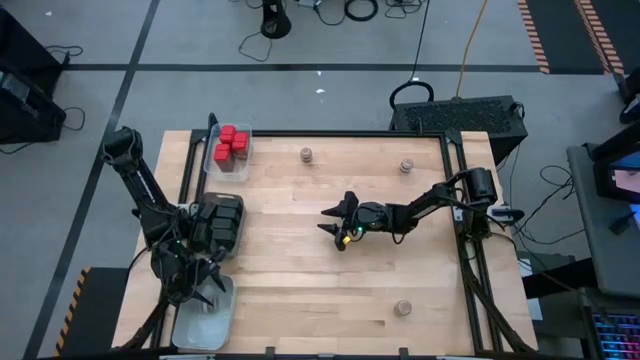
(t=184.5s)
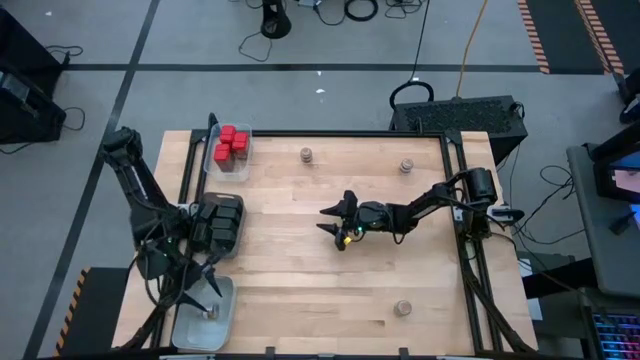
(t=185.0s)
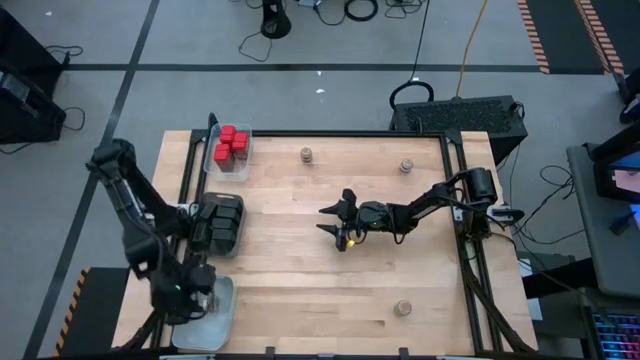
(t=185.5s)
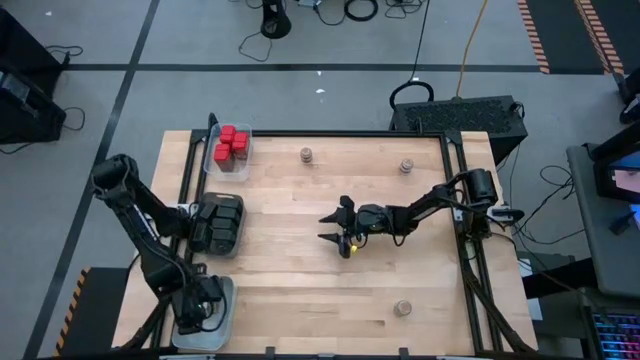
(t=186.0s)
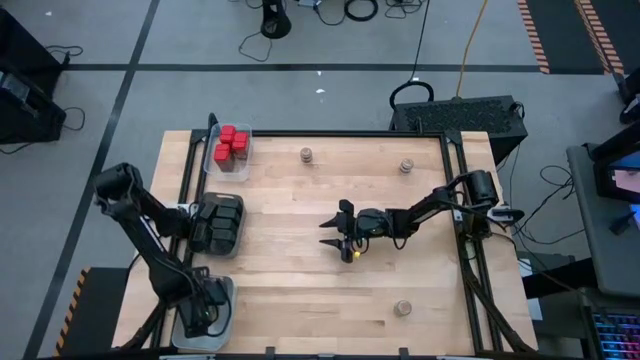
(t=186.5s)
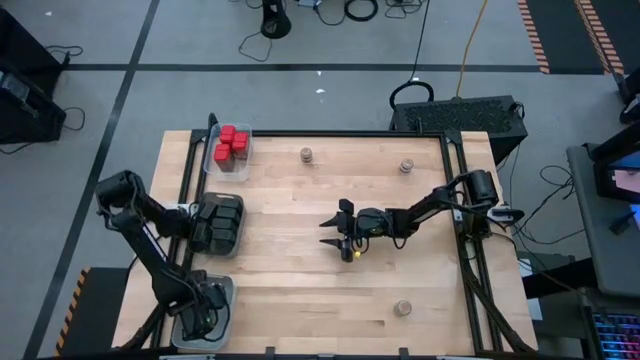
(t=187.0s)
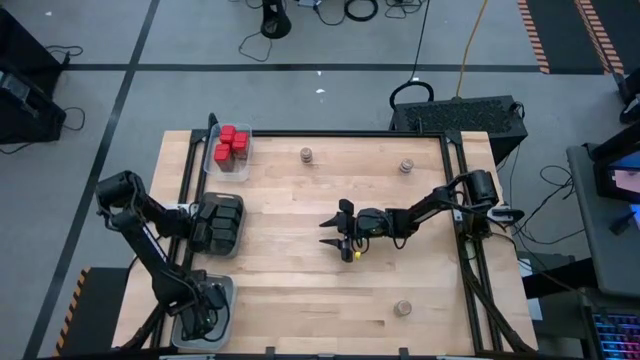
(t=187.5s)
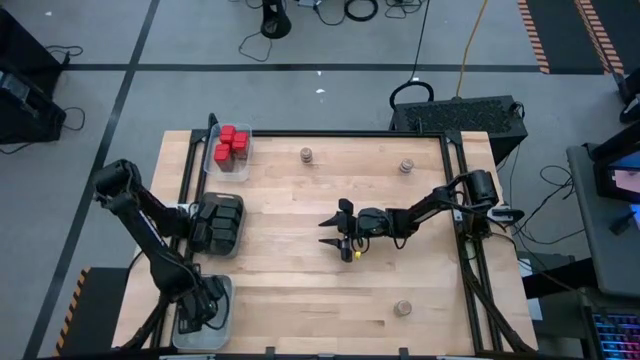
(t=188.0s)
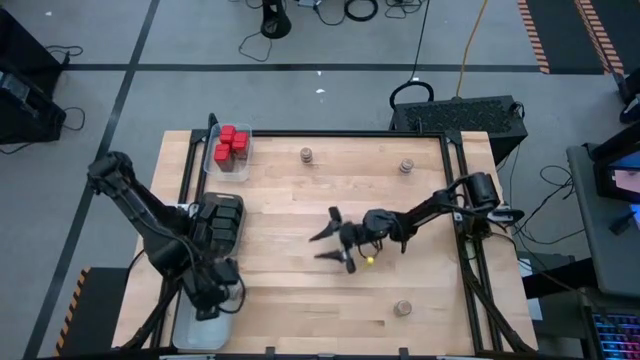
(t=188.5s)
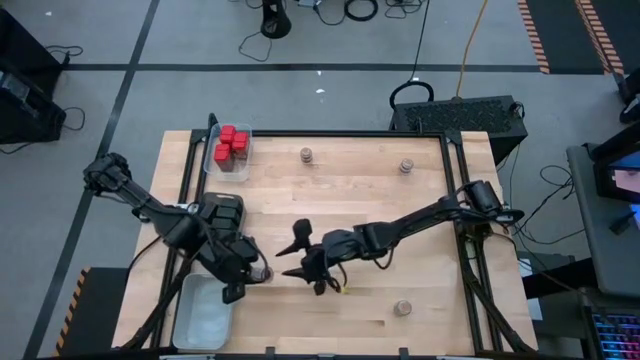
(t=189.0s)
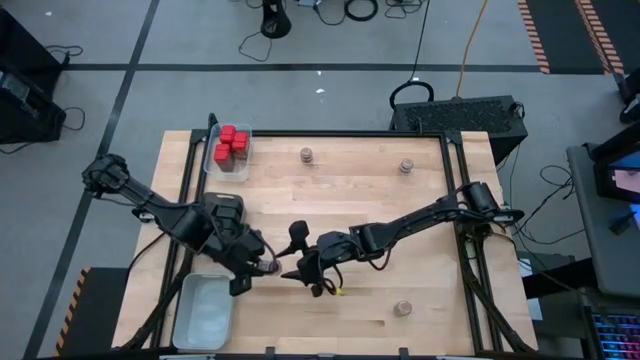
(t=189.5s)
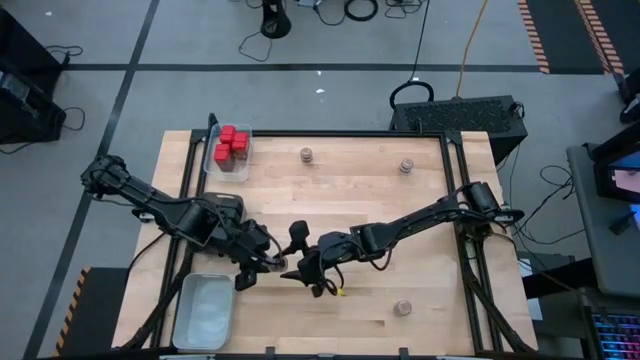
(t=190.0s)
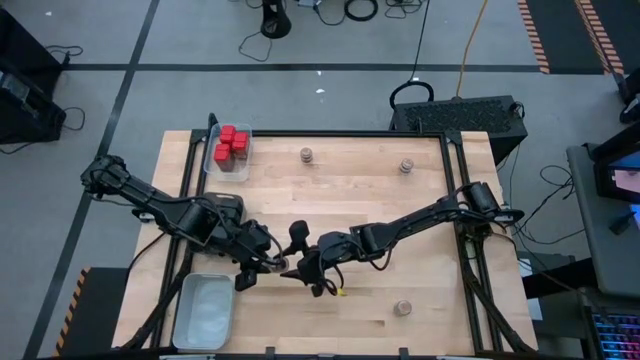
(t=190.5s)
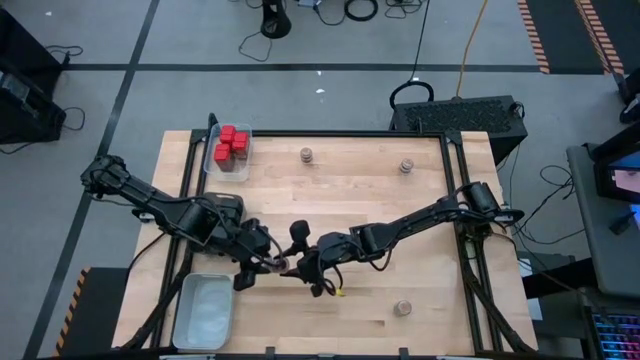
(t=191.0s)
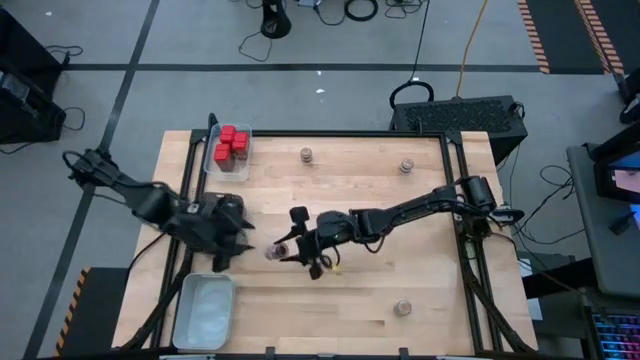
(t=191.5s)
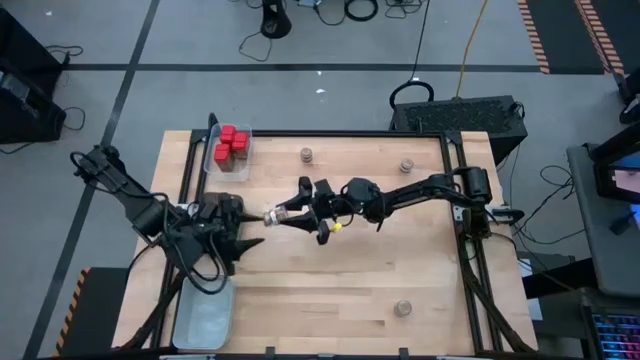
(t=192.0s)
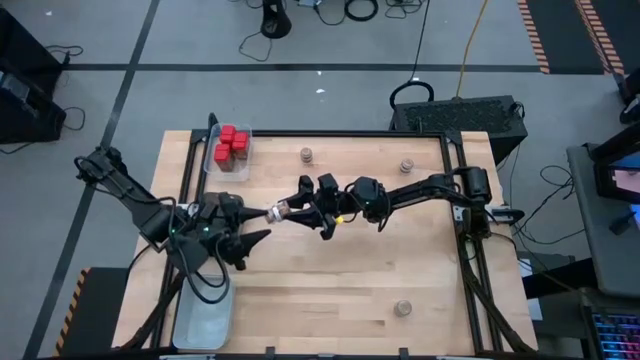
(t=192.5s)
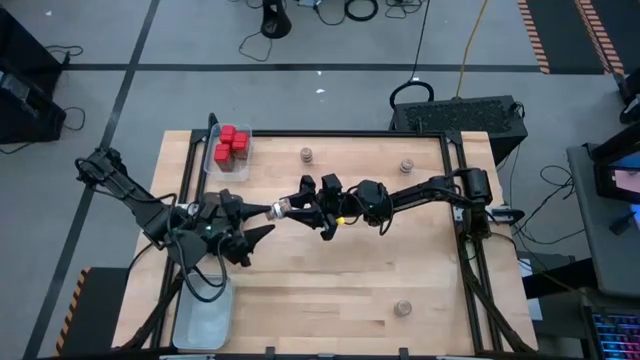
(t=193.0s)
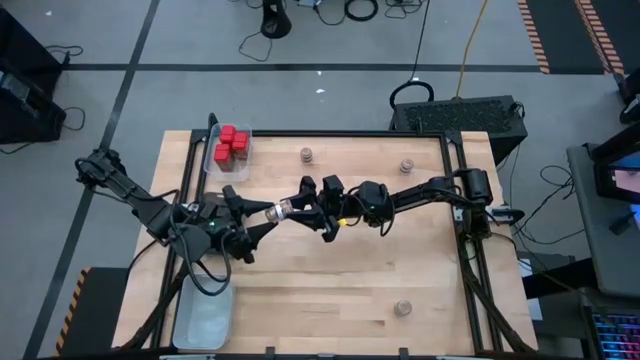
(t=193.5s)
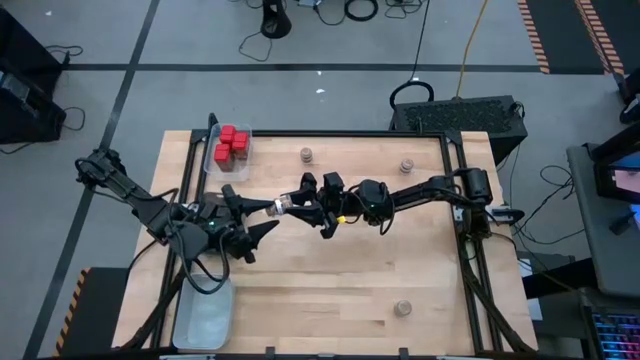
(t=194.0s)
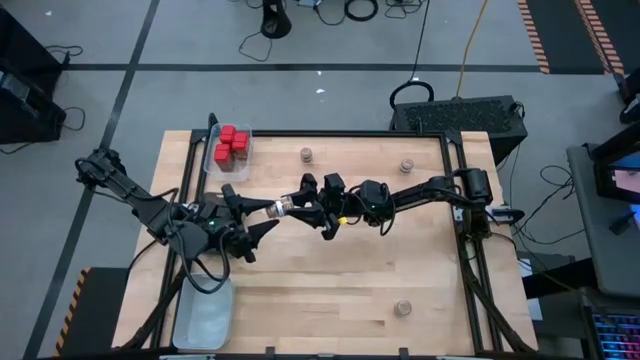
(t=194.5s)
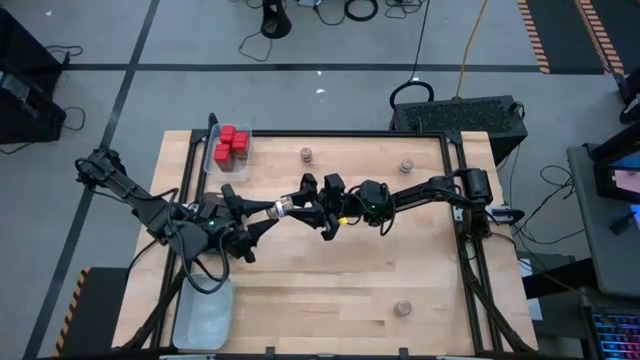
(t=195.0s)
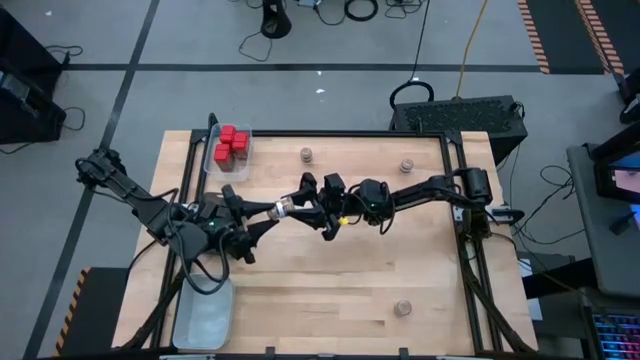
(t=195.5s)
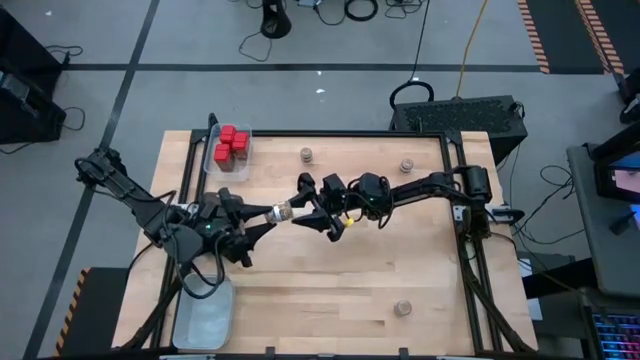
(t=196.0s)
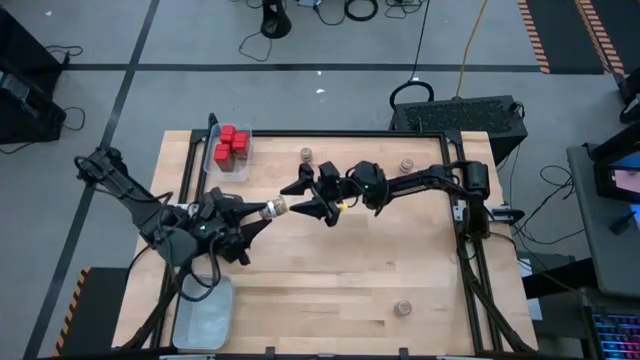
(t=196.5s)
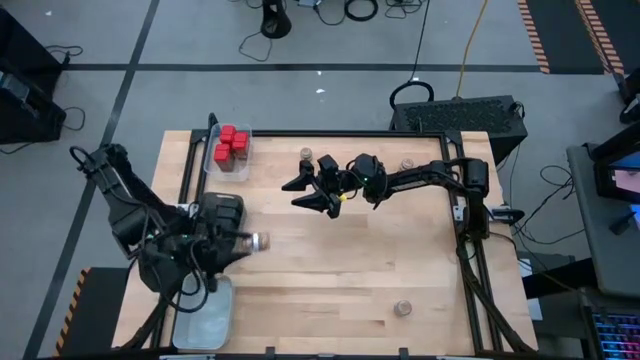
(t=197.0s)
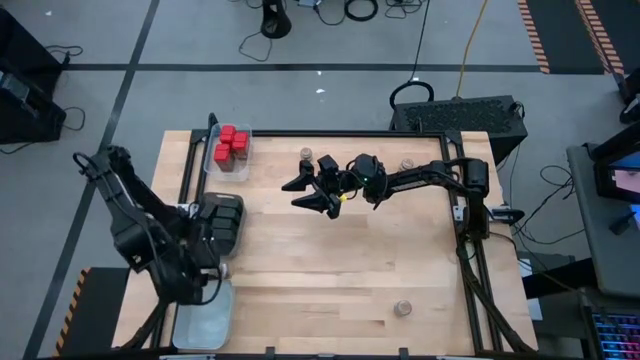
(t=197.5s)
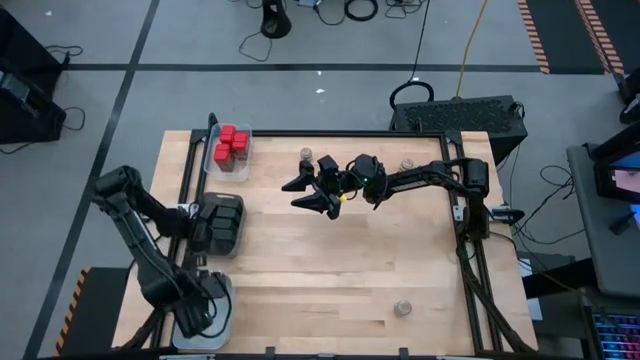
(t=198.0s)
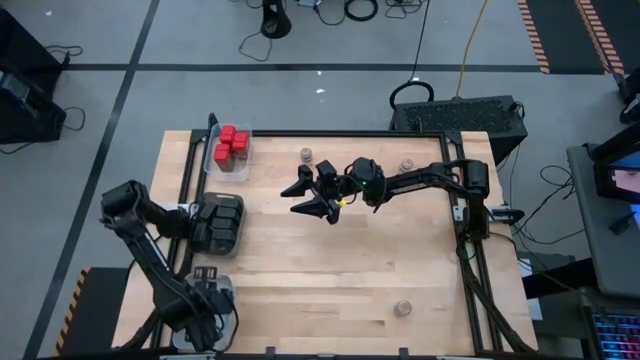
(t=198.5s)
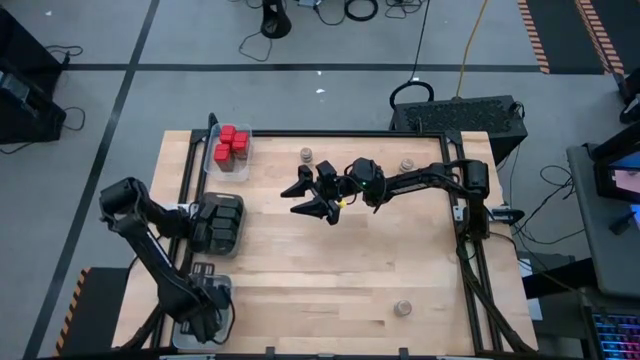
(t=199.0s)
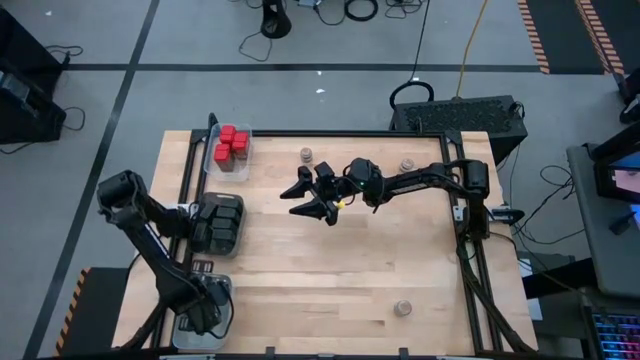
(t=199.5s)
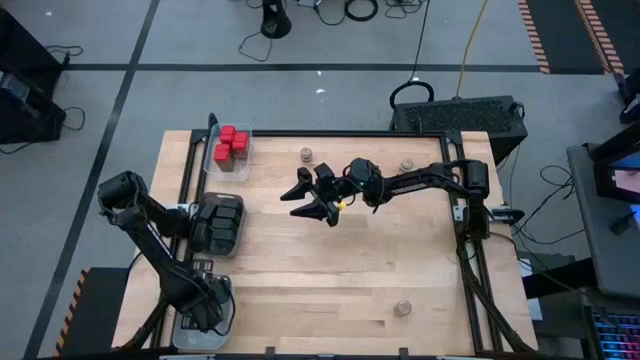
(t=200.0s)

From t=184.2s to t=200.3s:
Task: Sort spices by type
Put the brown seasoning bottle into the gray bin

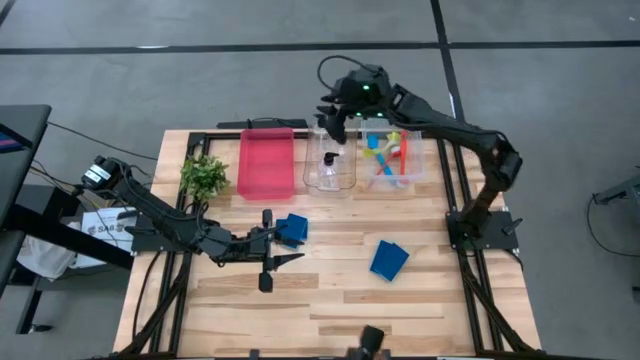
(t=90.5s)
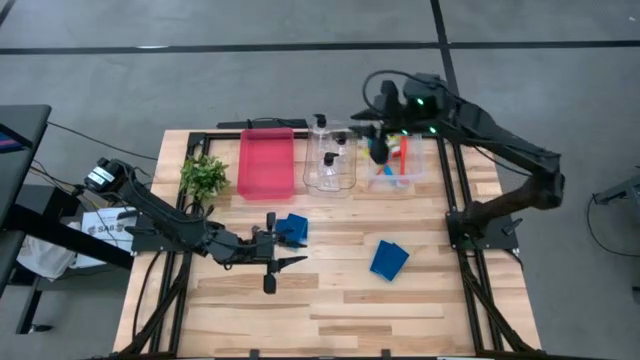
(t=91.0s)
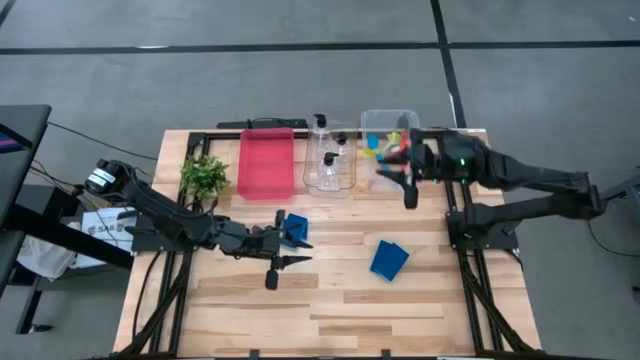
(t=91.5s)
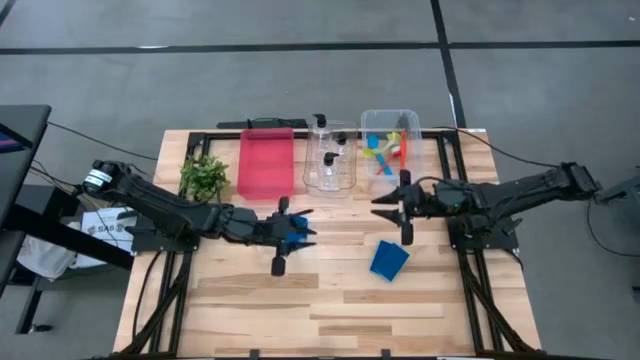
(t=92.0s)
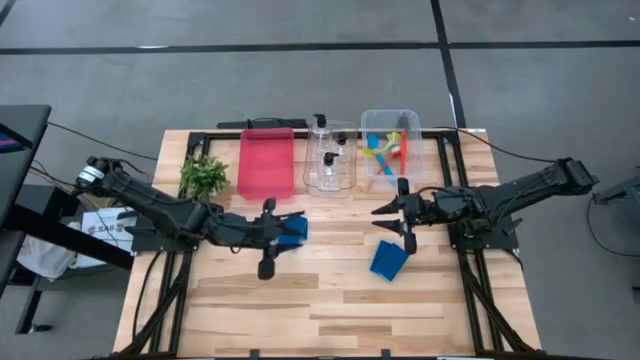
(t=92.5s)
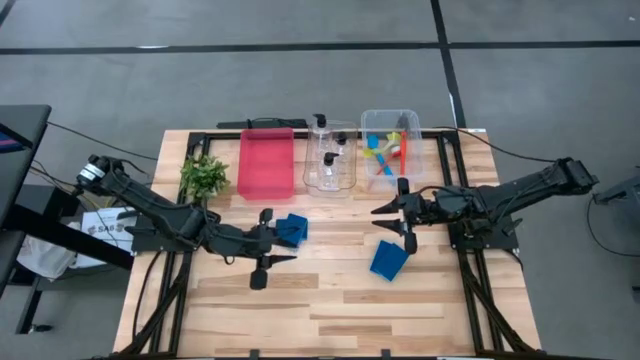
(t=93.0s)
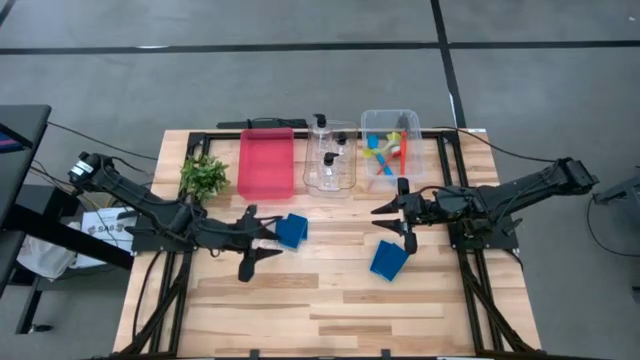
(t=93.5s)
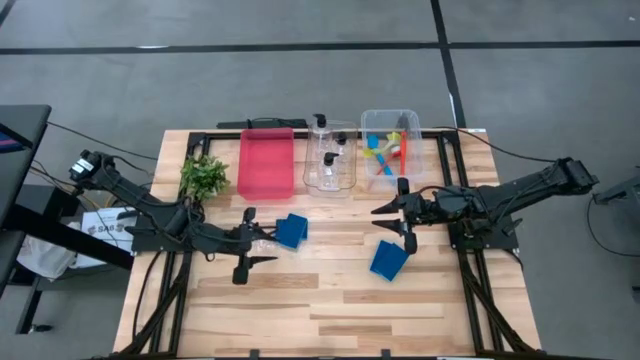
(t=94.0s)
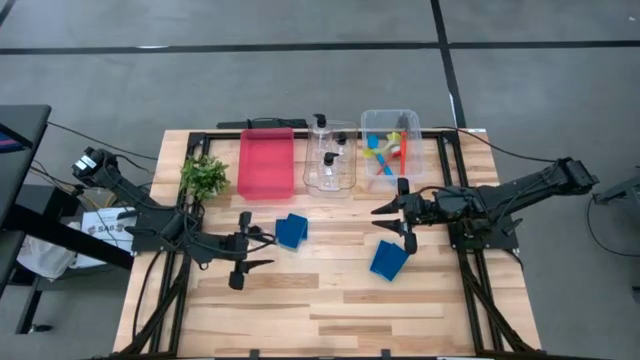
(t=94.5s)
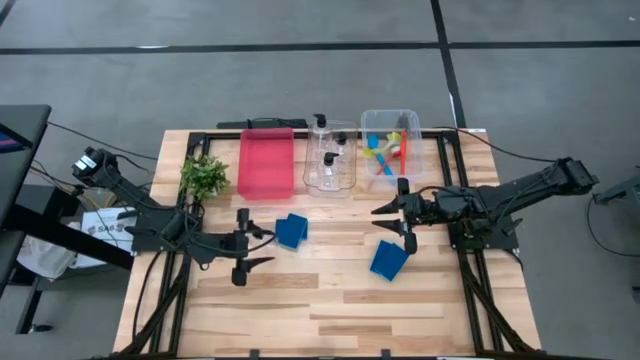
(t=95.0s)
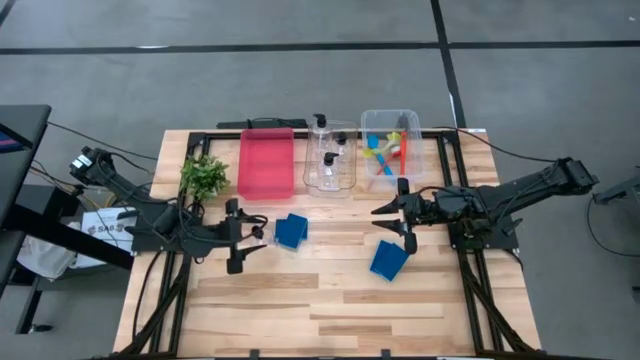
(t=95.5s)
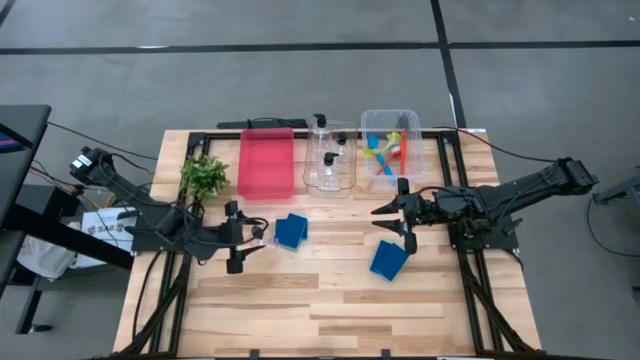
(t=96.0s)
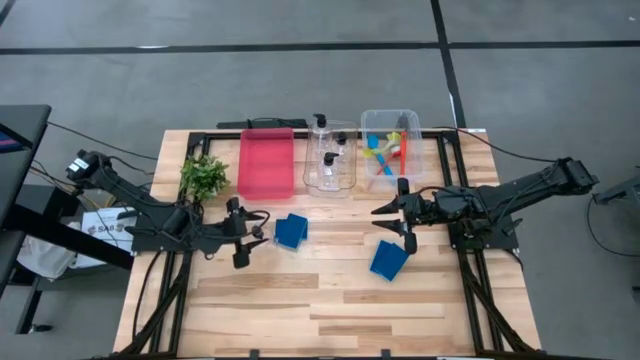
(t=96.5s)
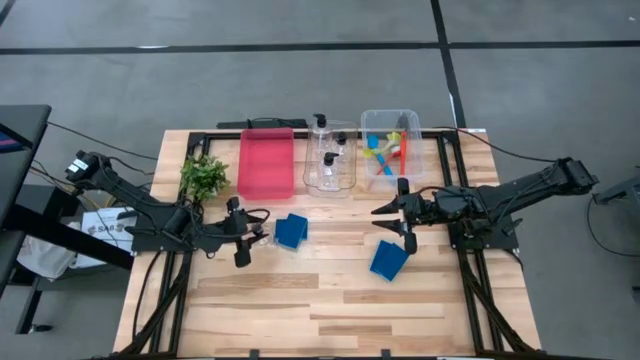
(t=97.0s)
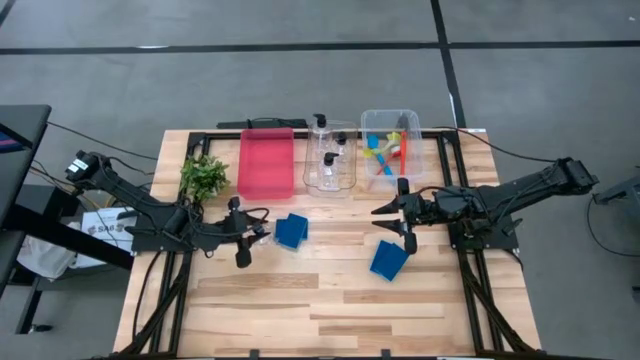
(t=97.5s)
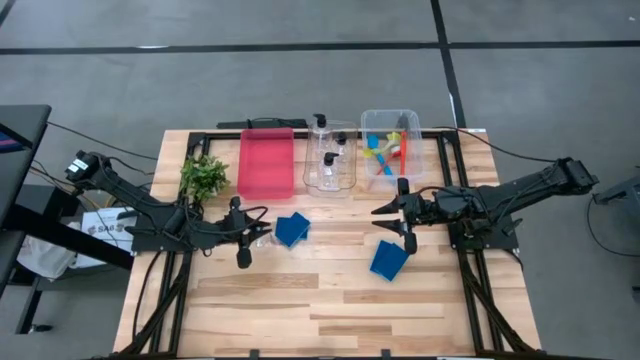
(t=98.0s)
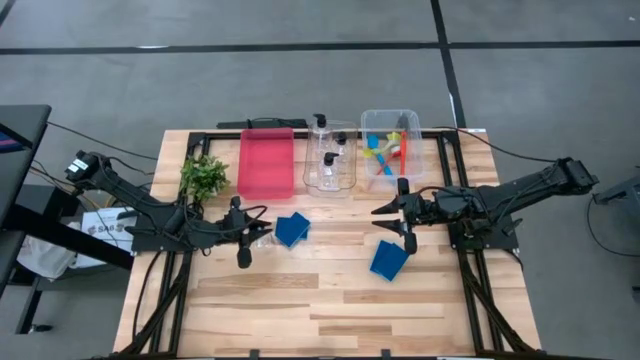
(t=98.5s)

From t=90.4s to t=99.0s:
Task: Pick & Place Kitchen Sink Supplies
Put the soap dispenser into the transparent bin
